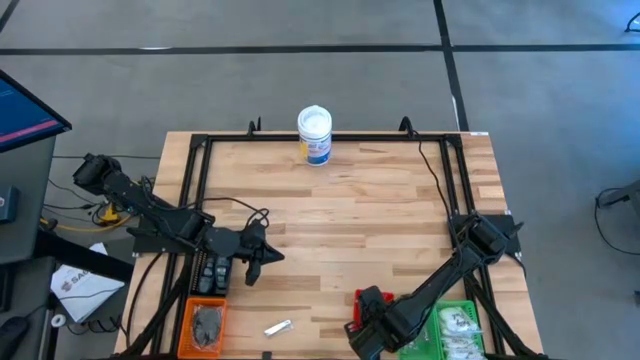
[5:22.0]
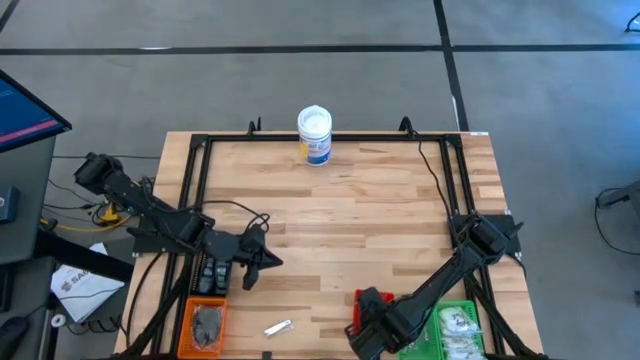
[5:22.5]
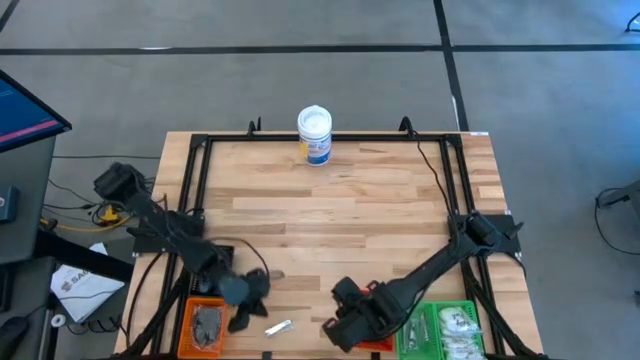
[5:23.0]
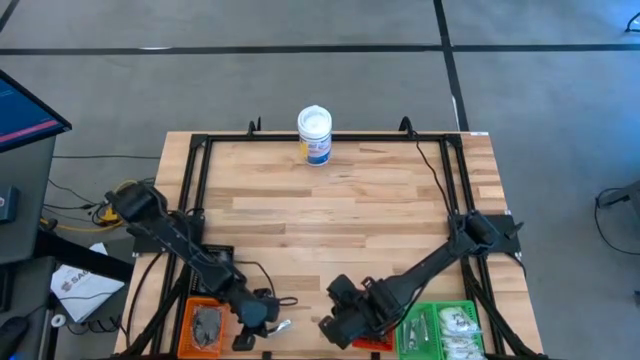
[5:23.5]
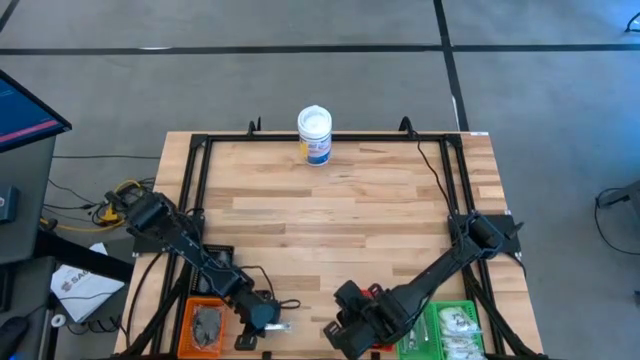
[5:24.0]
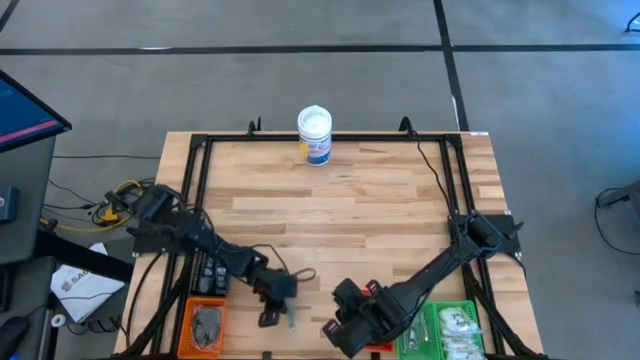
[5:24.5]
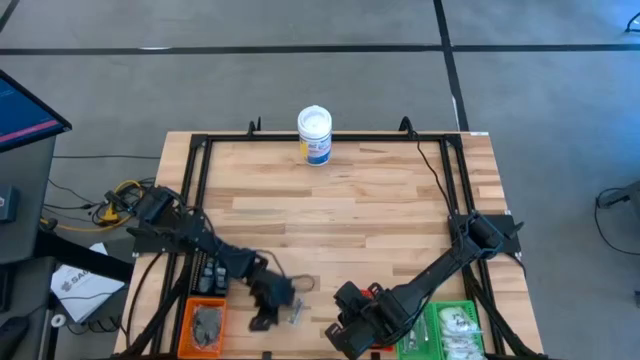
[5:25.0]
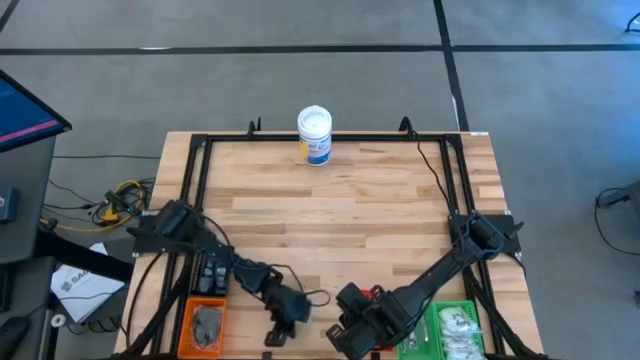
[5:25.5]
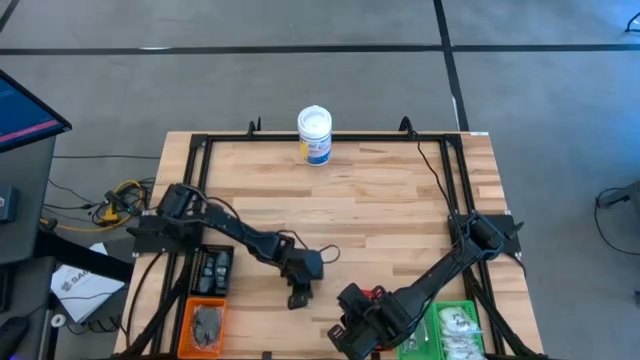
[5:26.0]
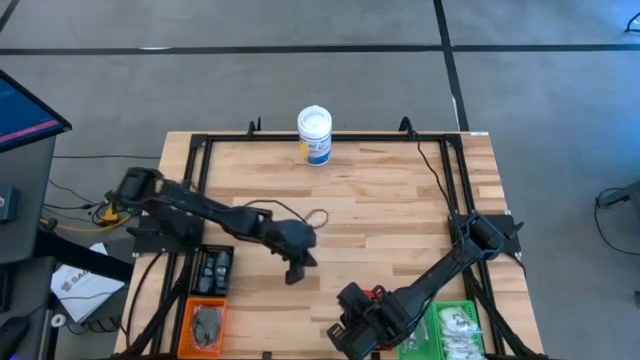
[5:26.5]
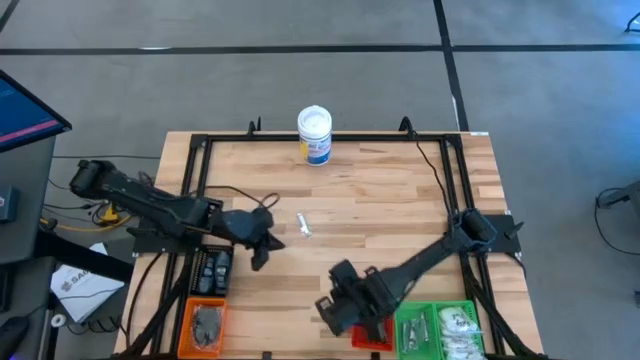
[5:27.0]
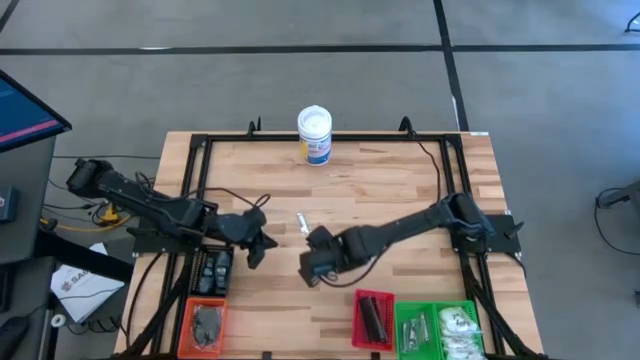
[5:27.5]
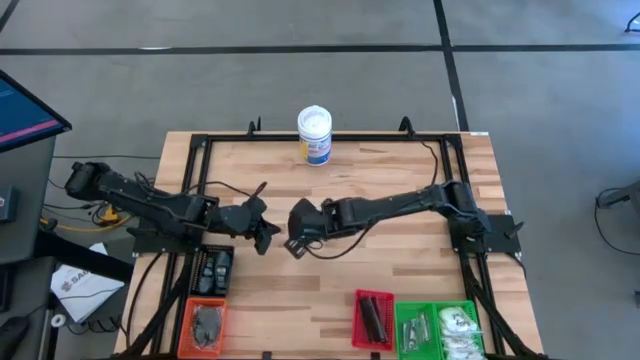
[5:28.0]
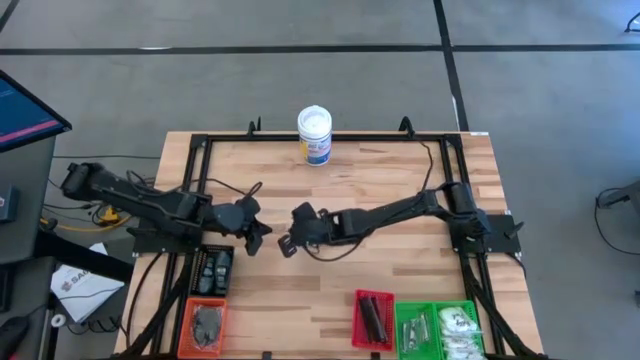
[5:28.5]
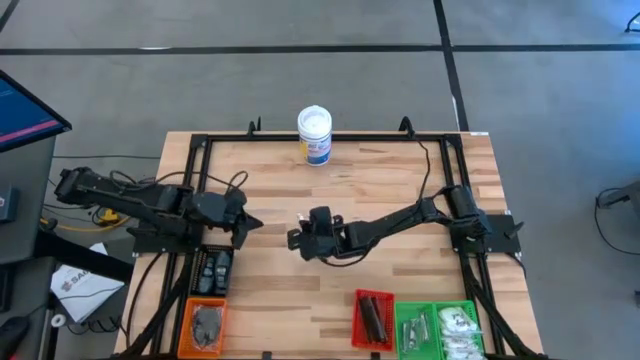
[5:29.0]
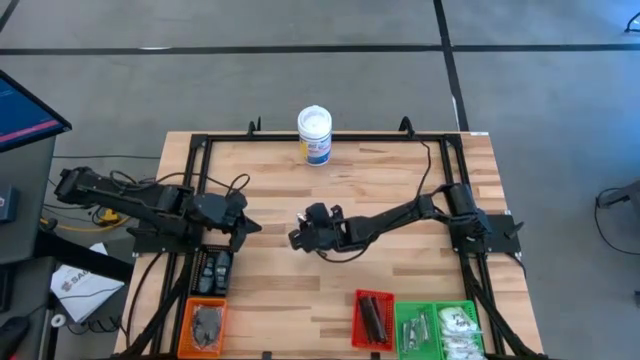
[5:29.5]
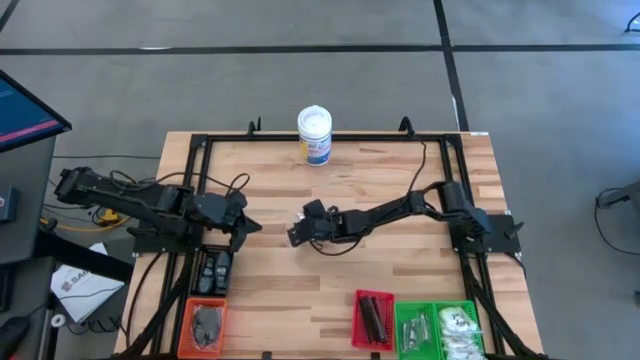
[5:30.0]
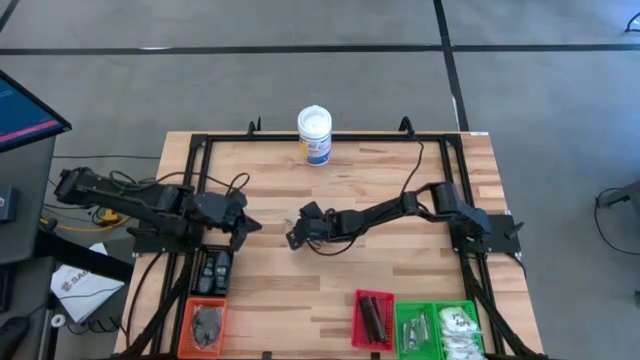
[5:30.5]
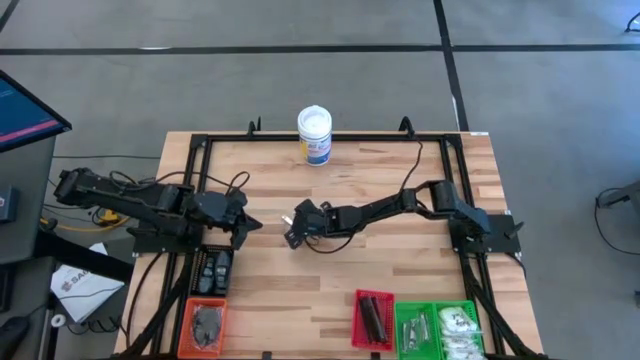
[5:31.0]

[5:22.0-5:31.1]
Task: Pick & Place Travel size toiletries
Put the silver nail cutter into the left green bin

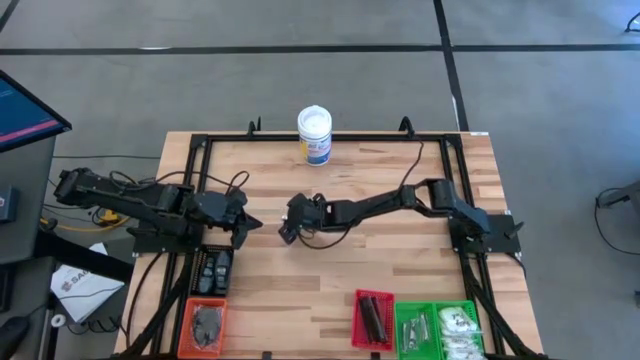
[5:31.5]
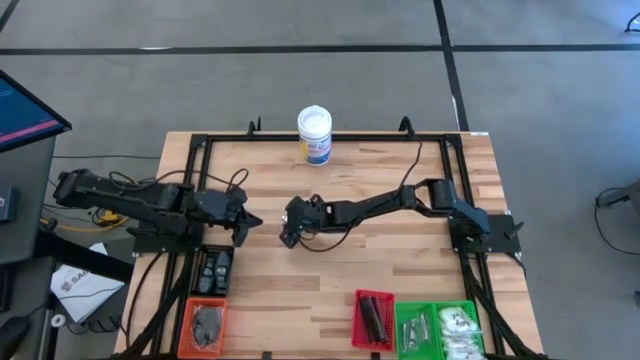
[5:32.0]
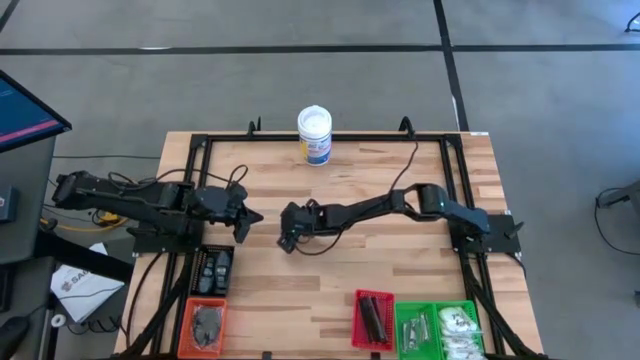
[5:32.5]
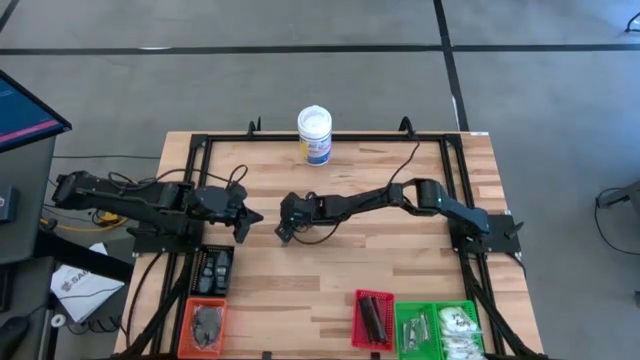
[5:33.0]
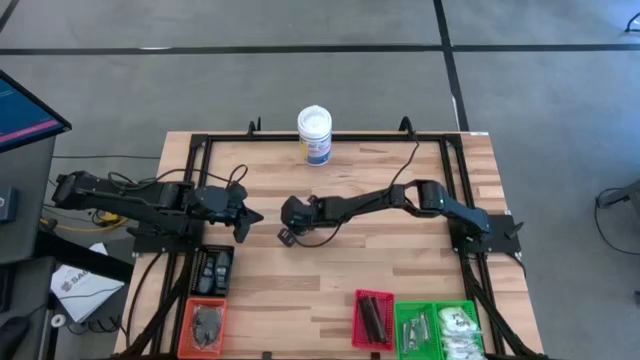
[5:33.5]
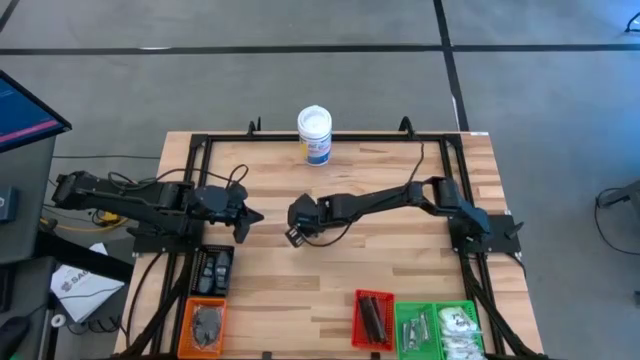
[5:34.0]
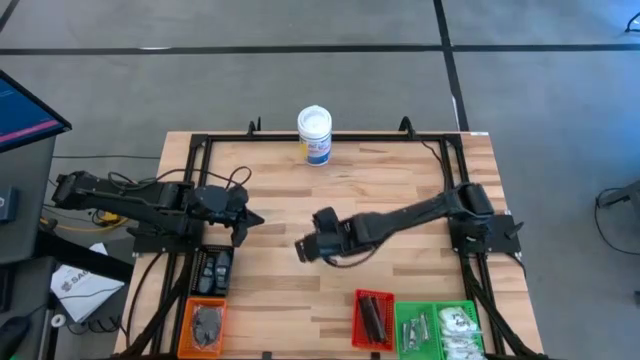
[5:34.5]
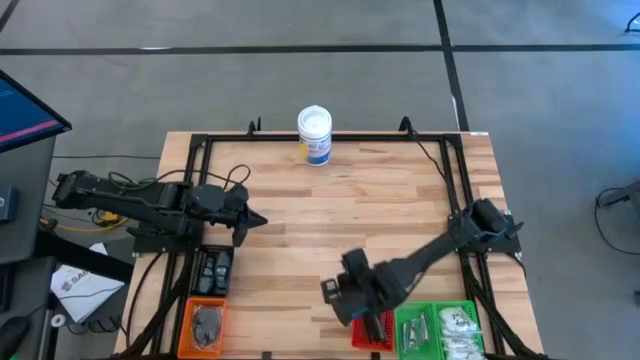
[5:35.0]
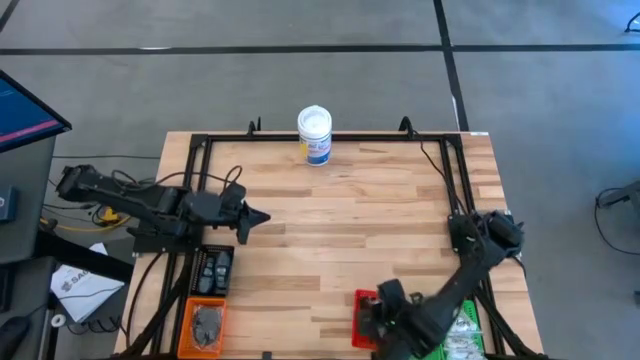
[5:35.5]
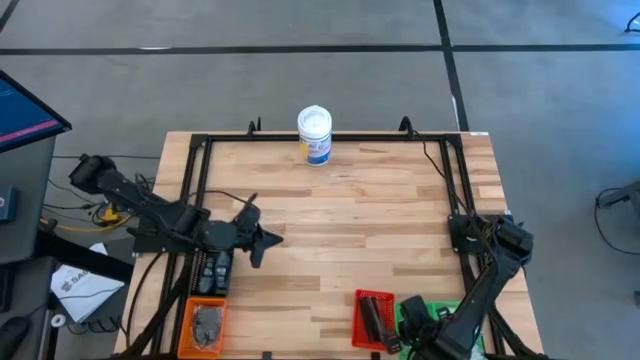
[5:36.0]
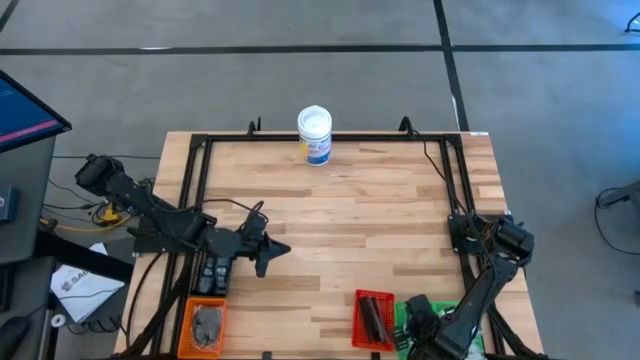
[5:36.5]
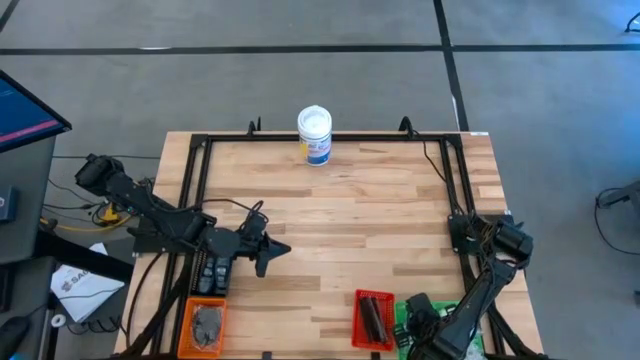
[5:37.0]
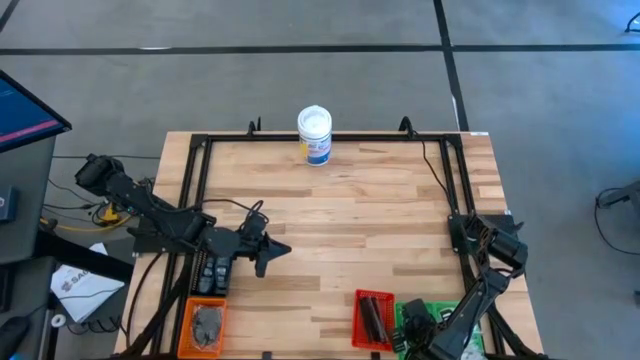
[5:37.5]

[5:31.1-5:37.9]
Put the silver nail cutter into the left green bin

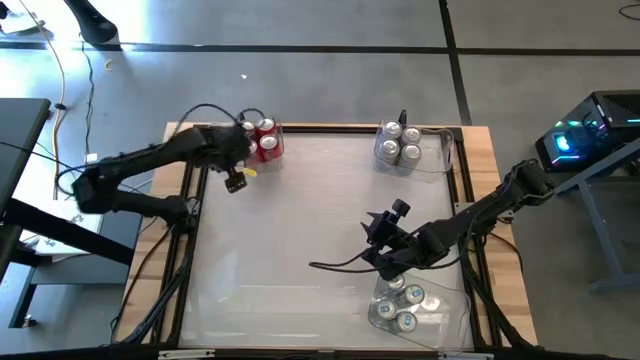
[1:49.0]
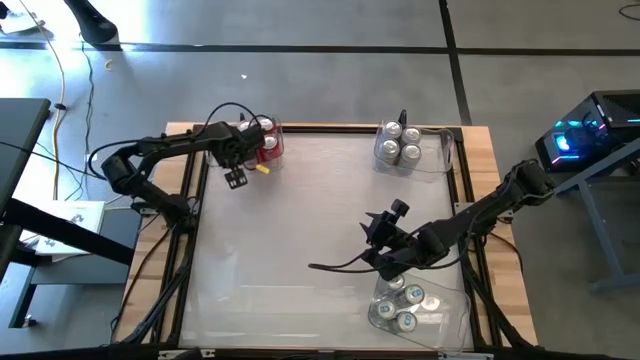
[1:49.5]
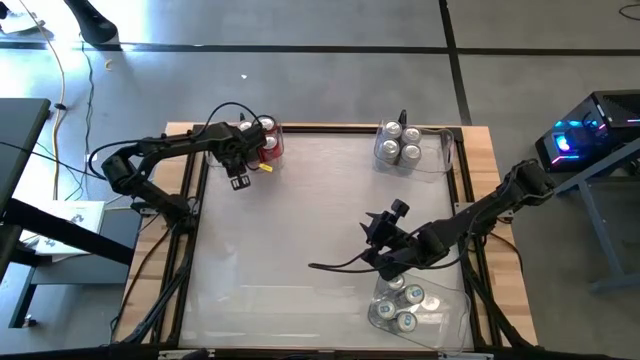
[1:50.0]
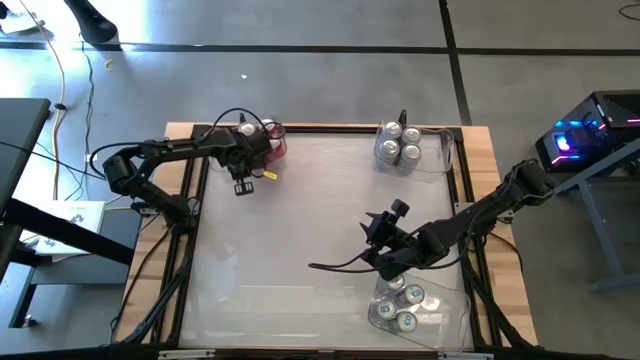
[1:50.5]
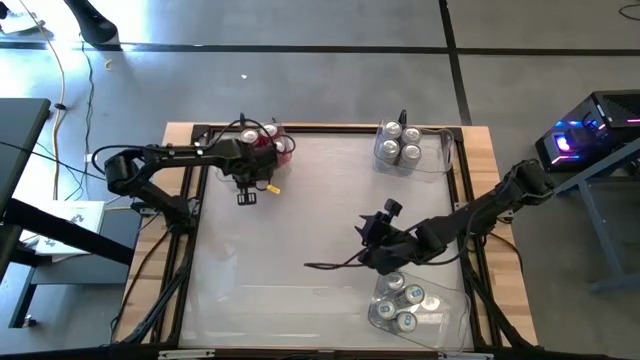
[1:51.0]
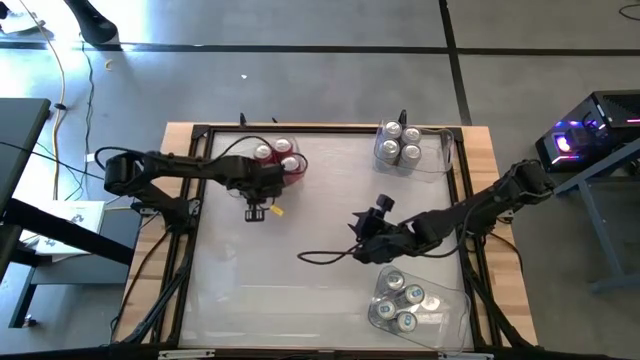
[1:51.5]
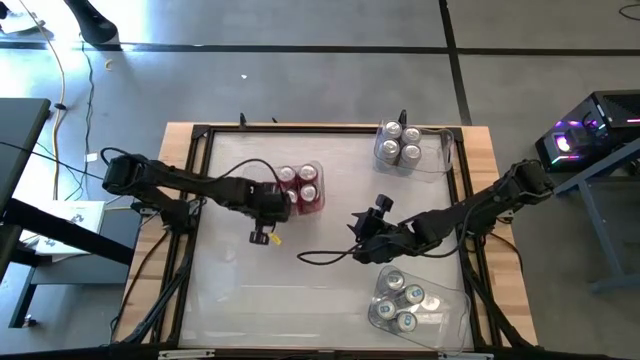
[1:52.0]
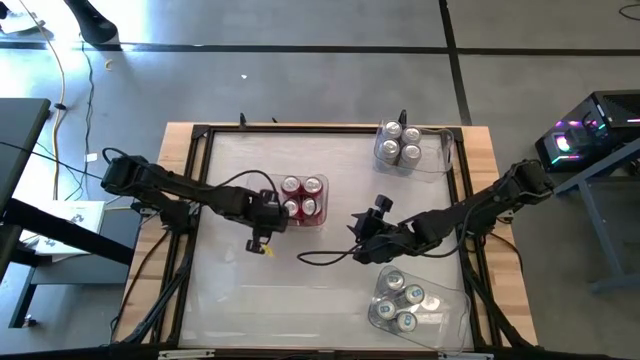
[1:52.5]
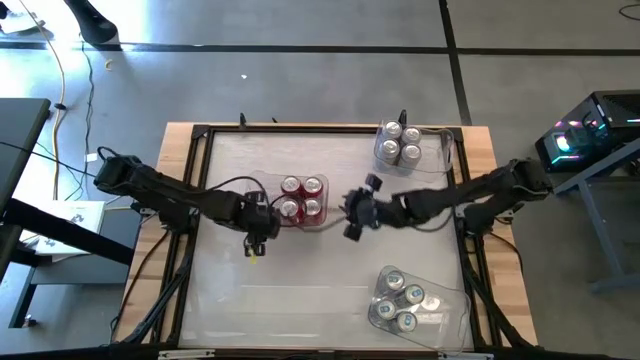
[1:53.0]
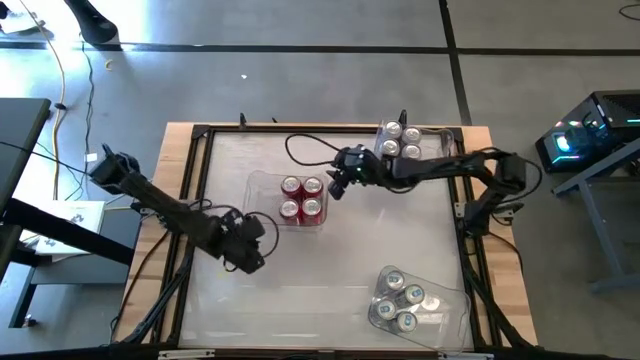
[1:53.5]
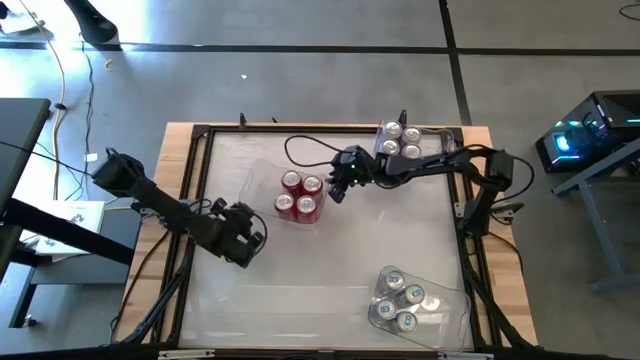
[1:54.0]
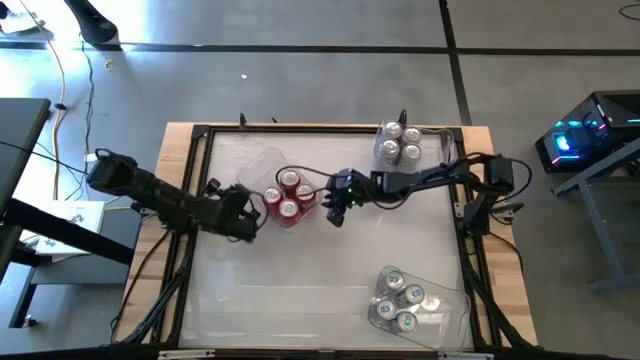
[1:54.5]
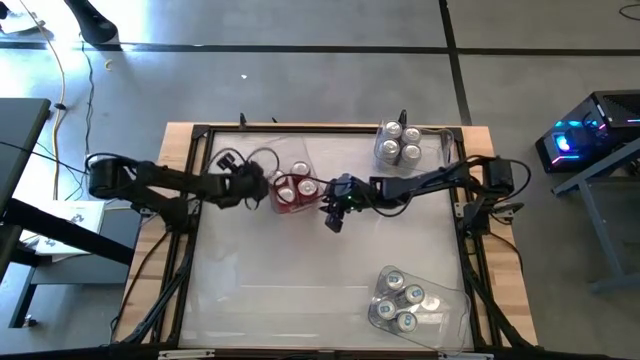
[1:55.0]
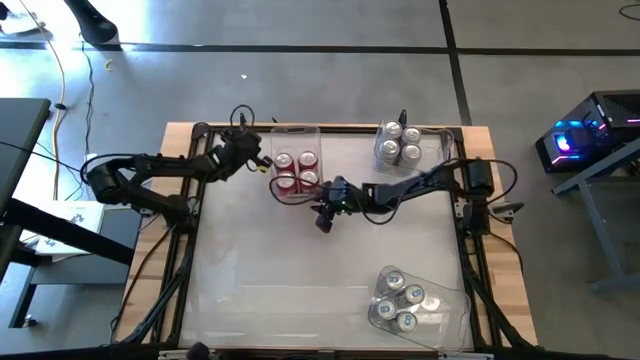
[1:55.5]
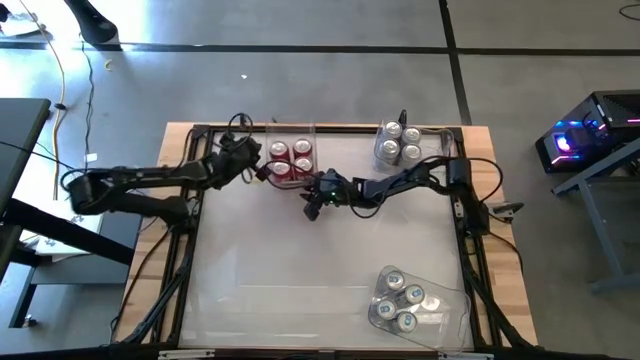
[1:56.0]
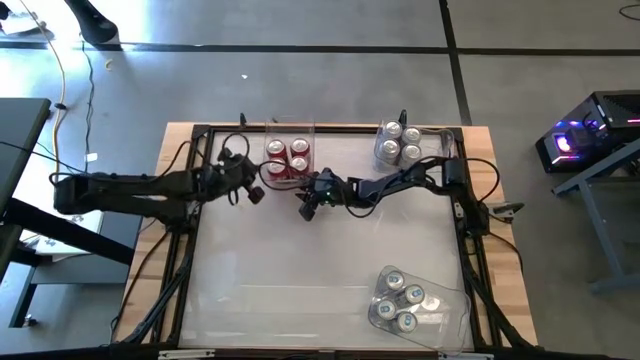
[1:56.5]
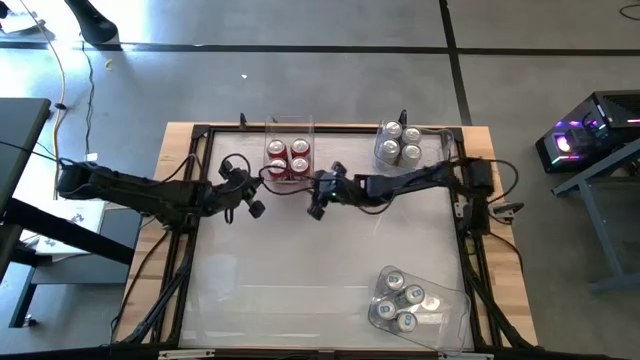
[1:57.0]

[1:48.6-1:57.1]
Task: Sort soda cans
Move the top left transparent bin to the top middle of the table
